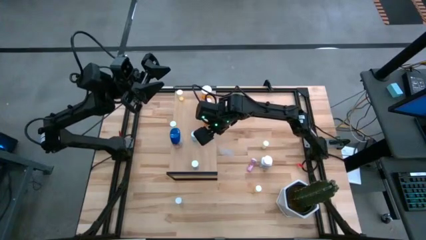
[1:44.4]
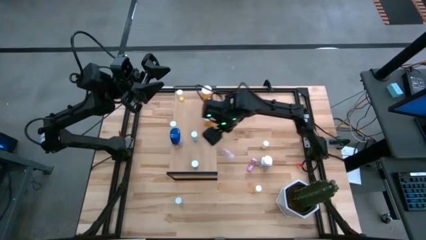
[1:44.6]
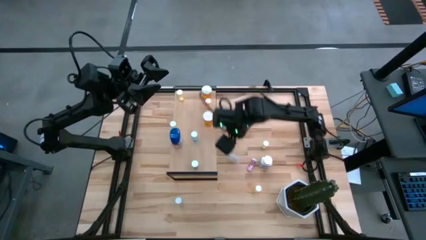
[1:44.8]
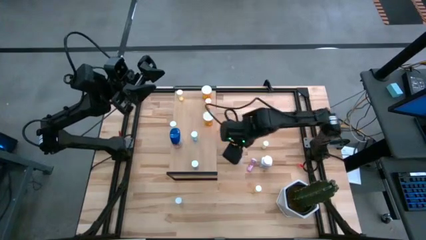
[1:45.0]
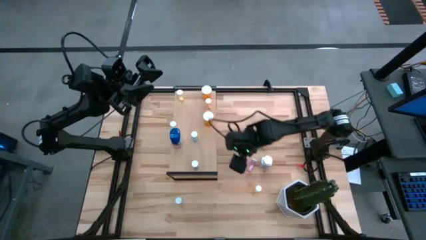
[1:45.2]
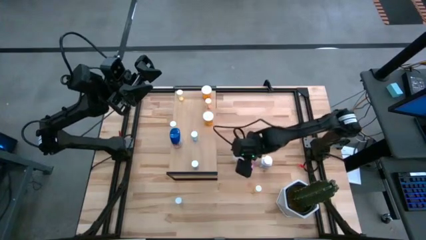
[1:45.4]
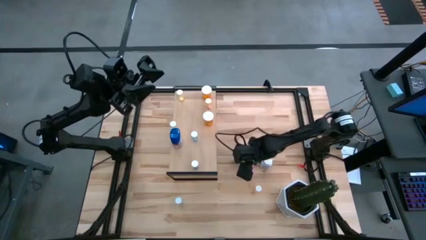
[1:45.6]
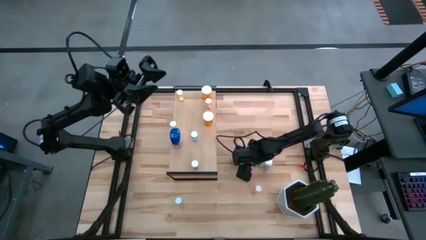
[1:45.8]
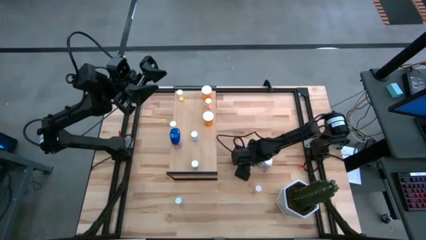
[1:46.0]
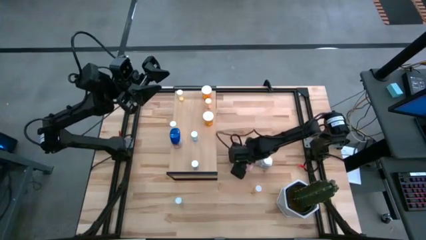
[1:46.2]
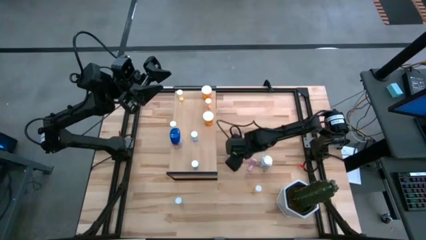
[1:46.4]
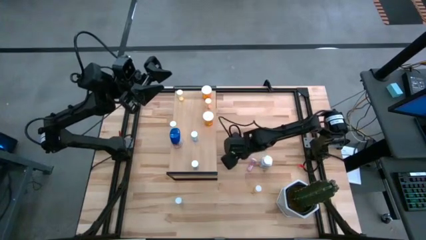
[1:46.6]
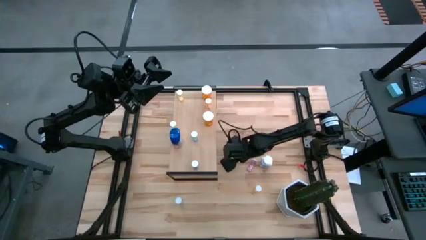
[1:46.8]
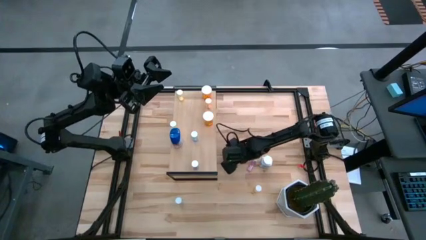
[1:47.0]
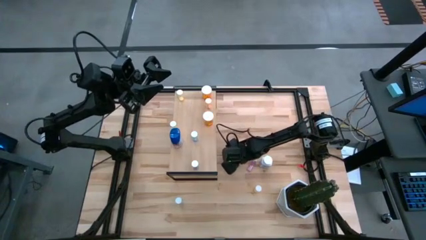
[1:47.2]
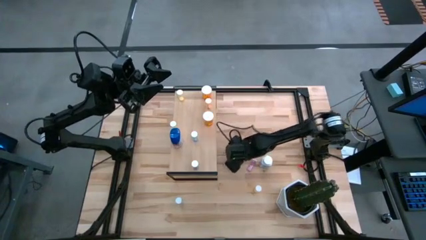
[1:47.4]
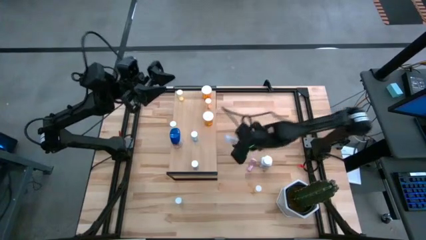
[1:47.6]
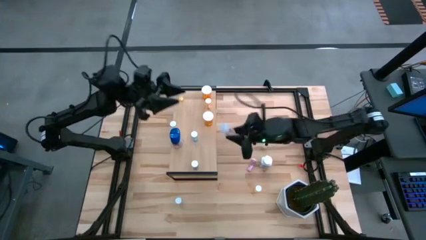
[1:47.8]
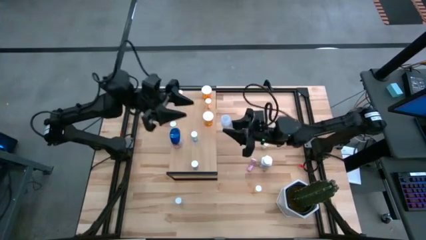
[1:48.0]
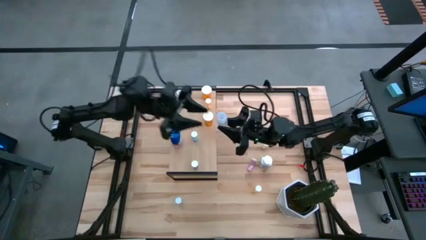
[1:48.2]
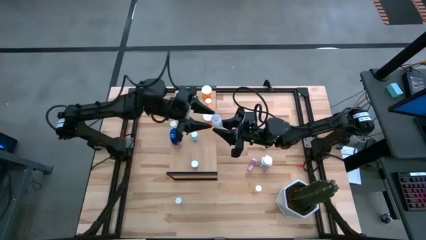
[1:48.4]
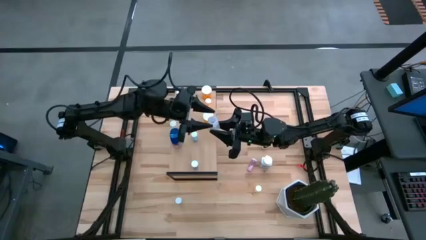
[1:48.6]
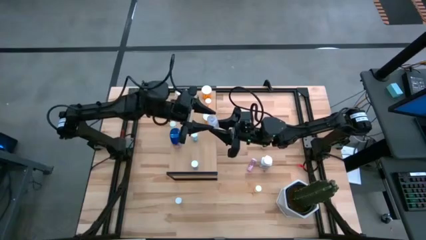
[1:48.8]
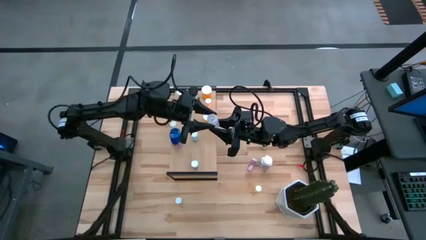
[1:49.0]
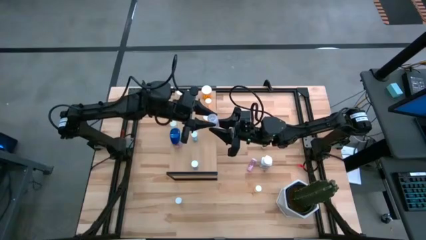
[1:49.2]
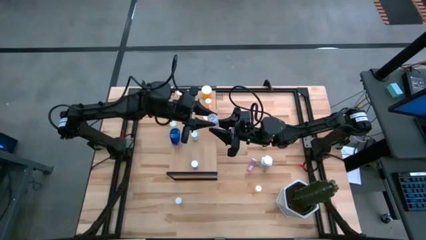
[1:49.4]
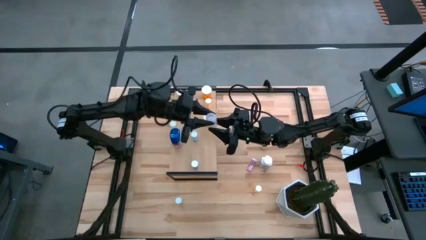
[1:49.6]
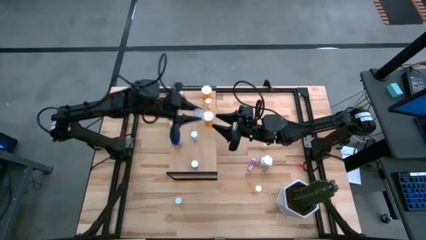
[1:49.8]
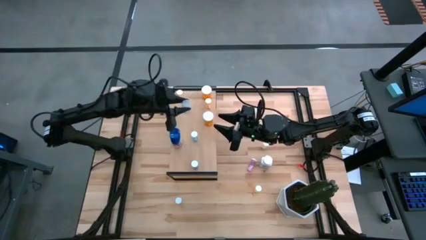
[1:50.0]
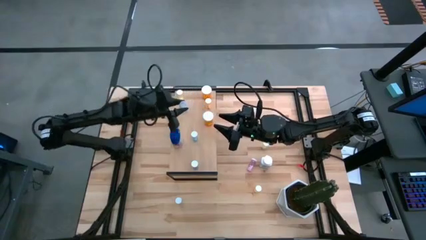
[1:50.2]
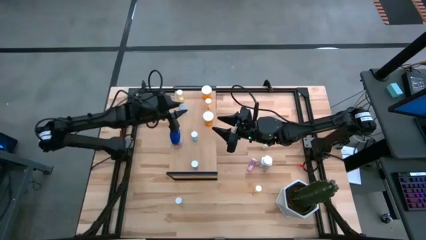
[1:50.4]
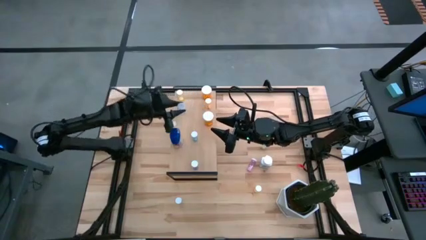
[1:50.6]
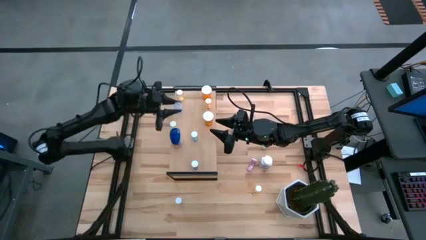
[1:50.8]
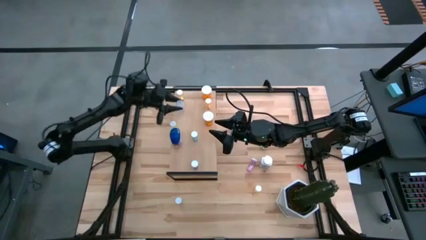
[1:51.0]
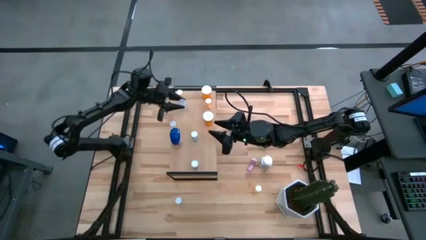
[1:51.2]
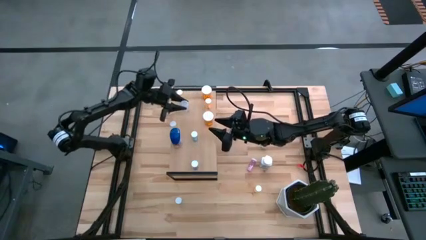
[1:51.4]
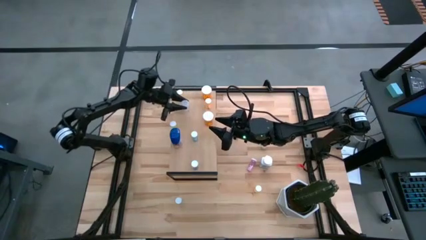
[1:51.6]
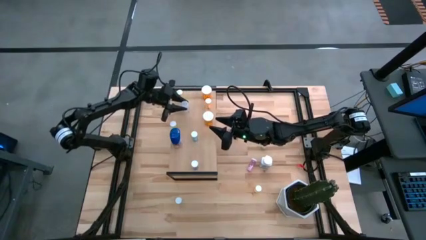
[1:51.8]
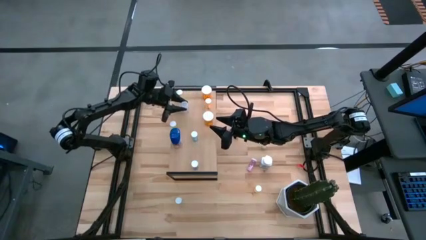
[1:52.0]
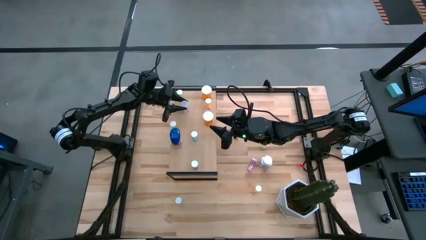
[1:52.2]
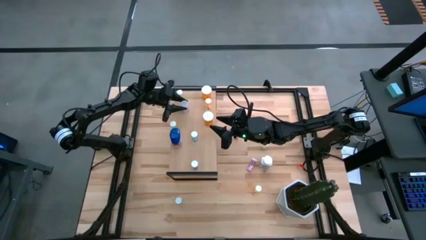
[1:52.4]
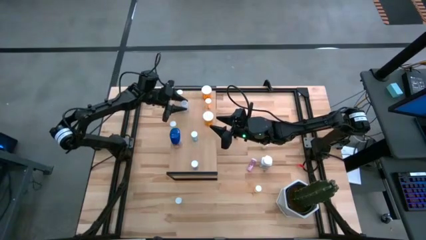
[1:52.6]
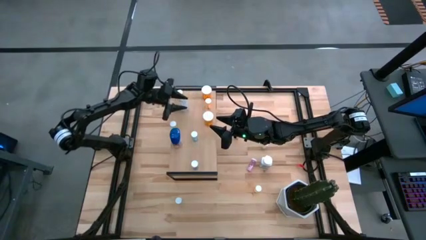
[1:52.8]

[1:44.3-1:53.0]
Task: Pick and place medicine bottles onto shelf by color
Put the middle transparent pill bottle on the shelf

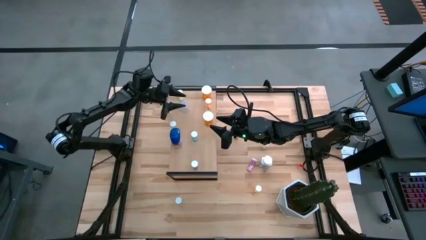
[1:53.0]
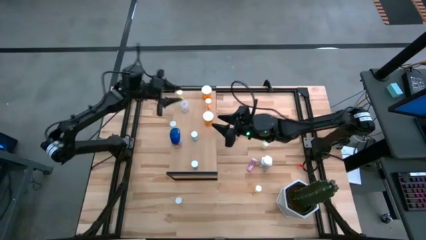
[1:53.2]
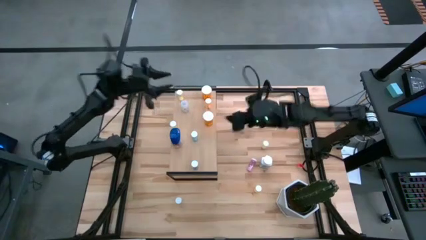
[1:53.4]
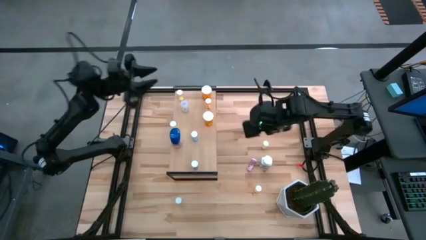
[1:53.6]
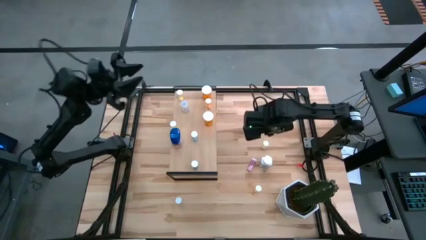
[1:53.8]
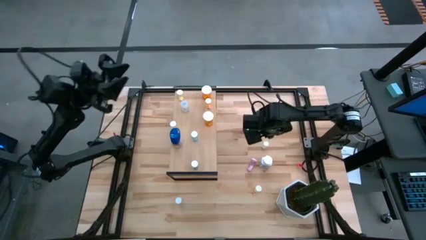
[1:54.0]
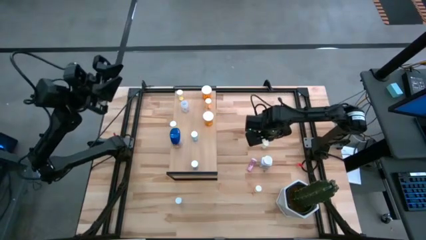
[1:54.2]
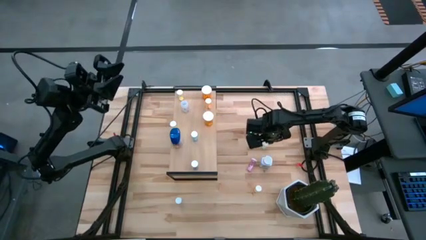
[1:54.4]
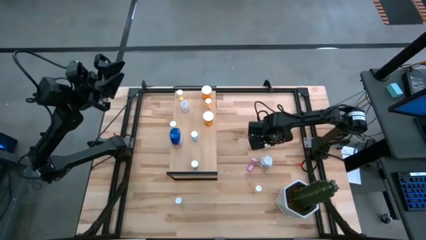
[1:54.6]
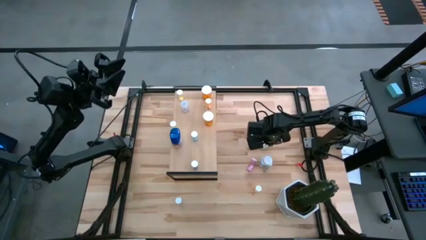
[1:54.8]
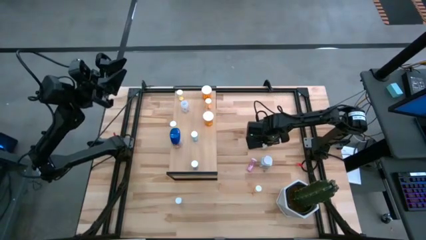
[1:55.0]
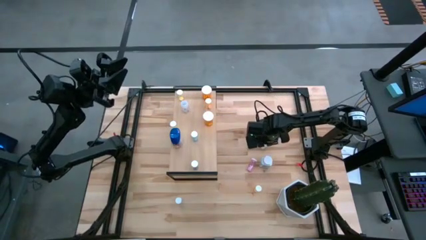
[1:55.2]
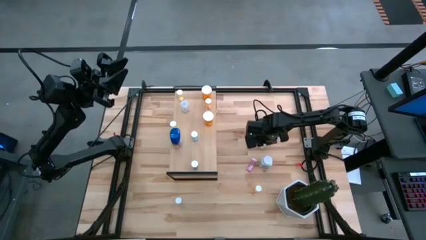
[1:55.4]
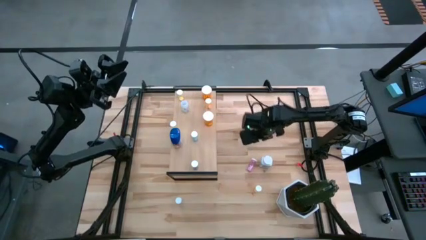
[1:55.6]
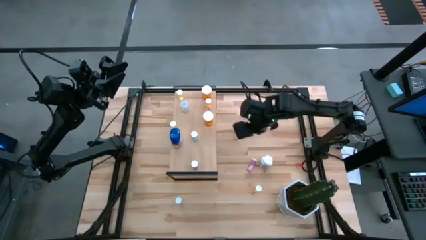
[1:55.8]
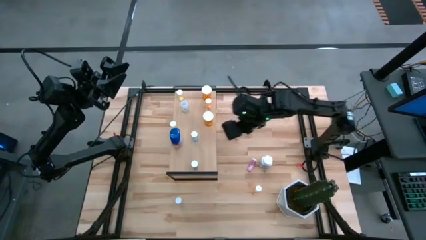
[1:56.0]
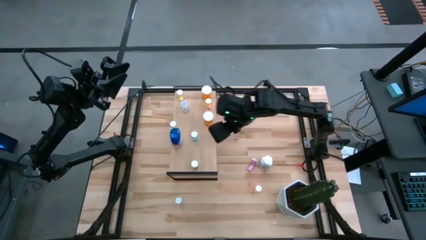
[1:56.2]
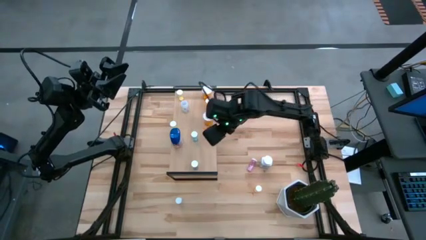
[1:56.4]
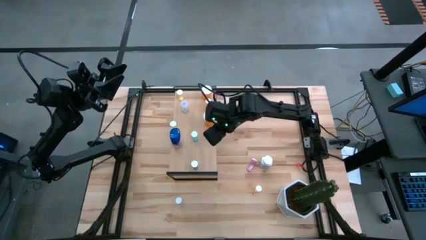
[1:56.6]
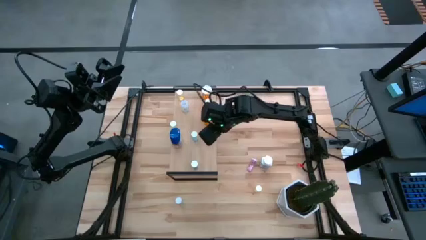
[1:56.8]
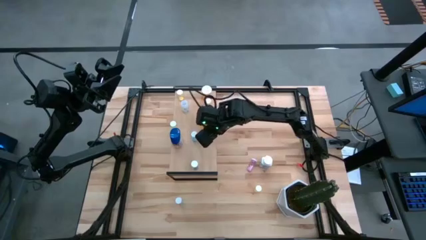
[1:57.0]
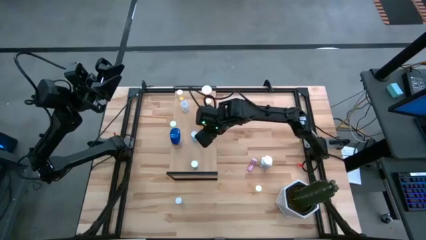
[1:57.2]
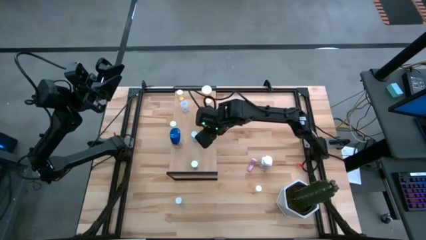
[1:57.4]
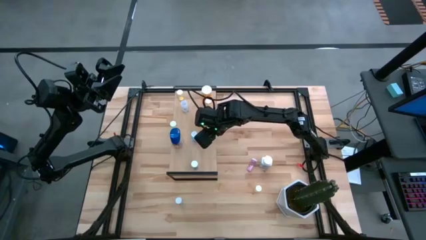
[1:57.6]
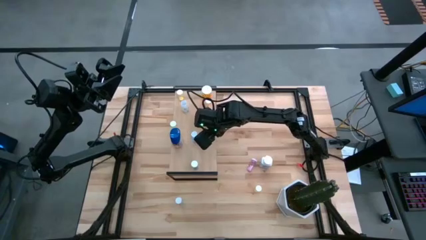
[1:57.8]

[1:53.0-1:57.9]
Put the top yellow tablet bottle on the shelf

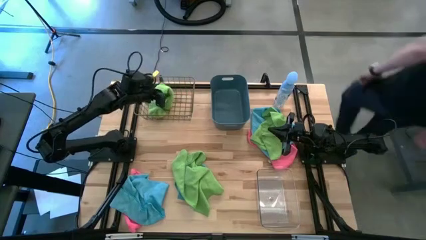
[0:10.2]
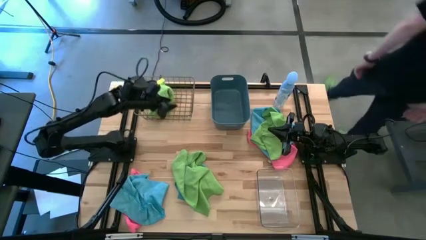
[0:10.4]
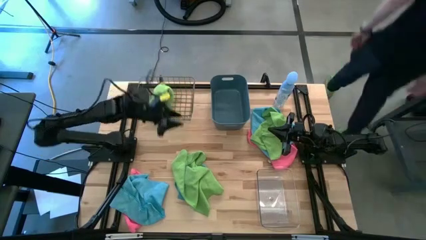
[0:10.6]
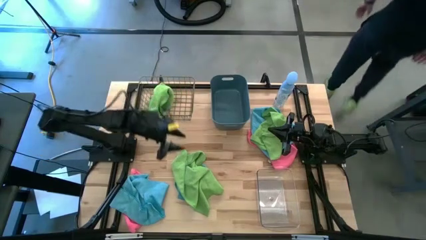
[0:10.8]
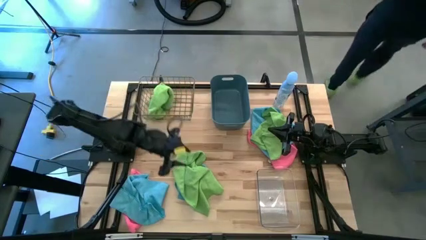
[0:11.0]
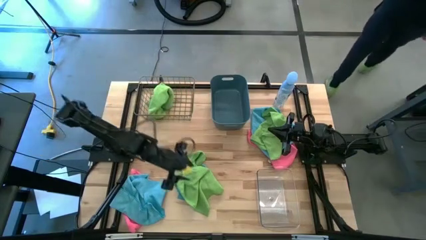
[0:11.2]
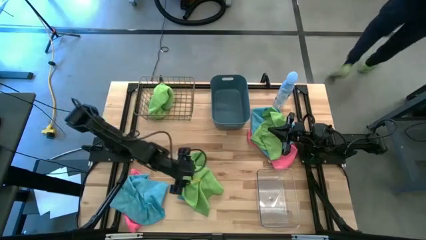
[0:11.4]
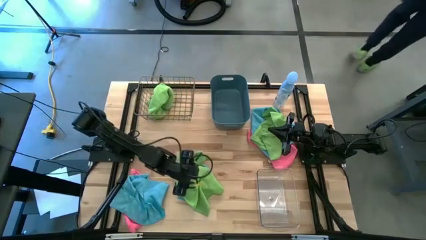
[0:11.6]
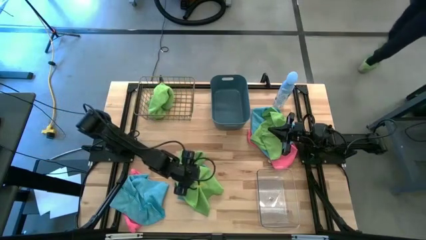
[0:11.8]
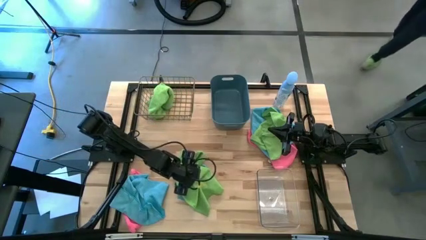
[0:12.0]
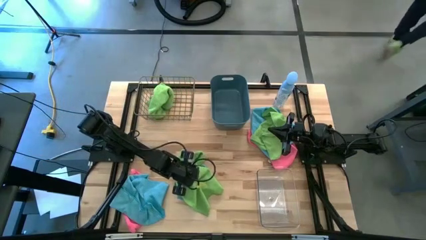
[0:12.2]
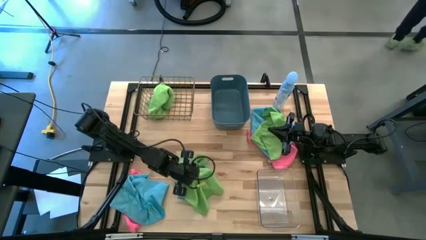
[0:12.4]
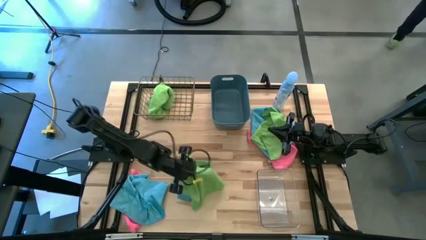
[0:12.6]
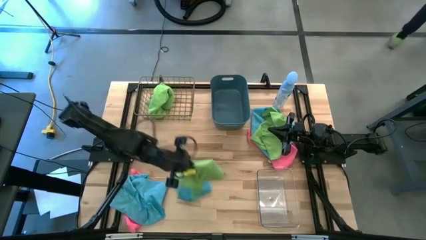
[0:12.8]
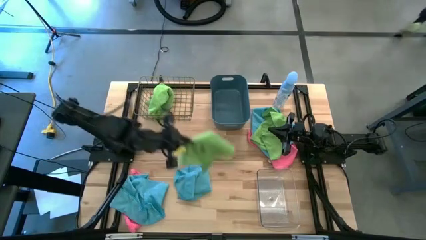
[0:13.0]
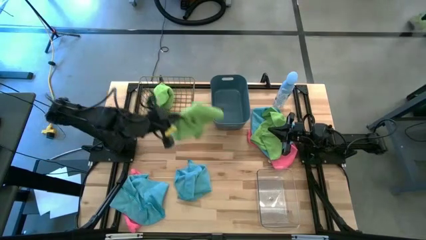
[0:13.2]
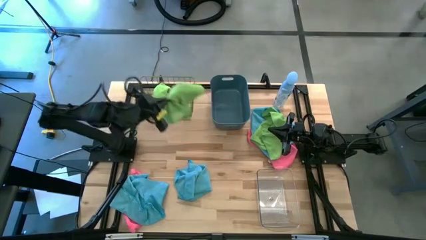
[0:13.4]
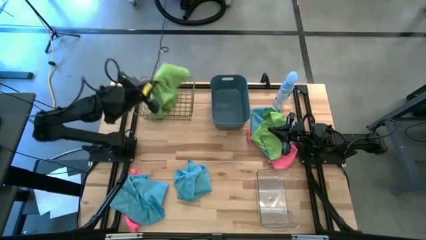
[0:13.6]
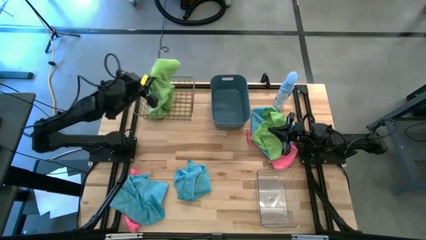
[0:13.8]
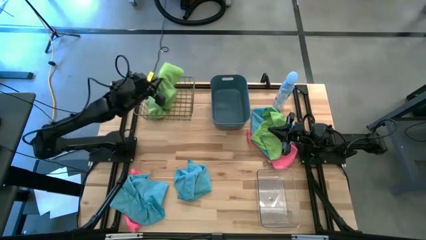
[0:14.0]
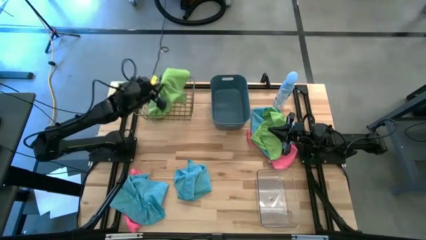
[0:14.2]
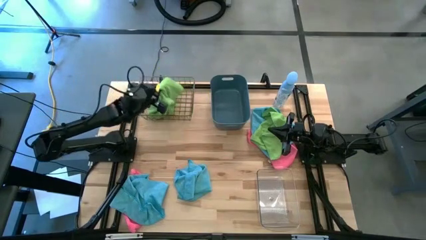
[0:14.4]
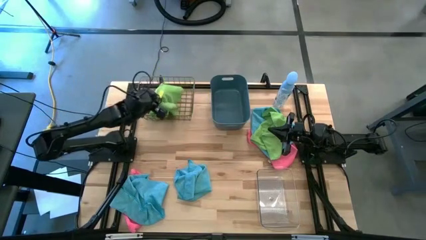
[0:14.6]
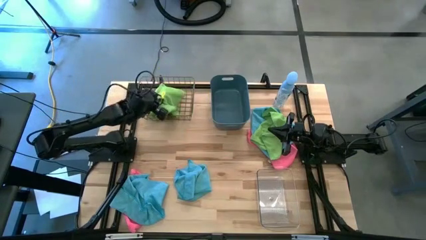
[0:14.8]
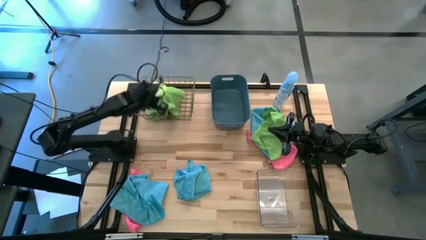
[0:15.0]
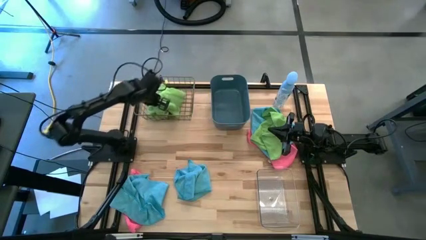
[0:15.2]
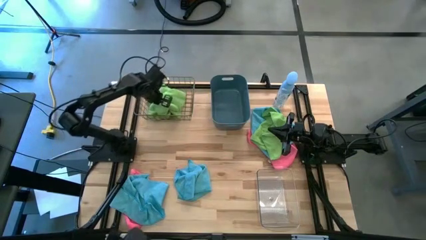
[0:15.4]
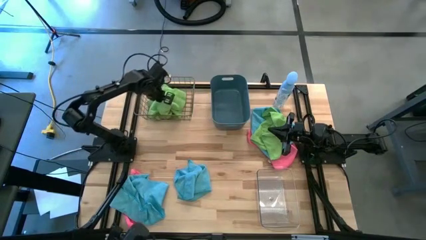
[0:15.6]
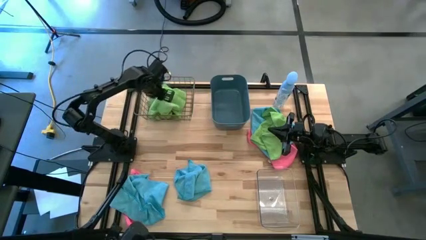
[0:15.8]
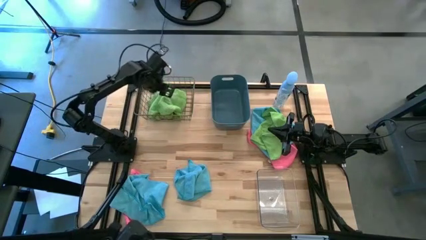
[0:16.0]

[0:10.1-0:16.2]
Task: Sort microfiber towel by color & place in baskets
Put the center green microfiber cloth into the wire bin
